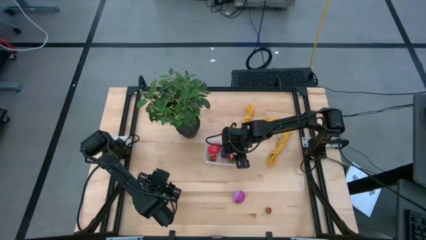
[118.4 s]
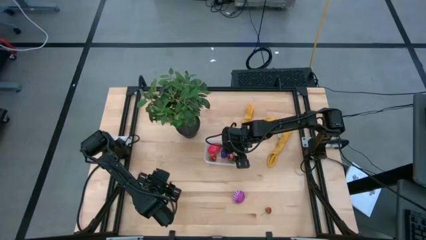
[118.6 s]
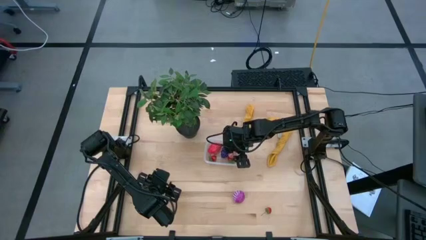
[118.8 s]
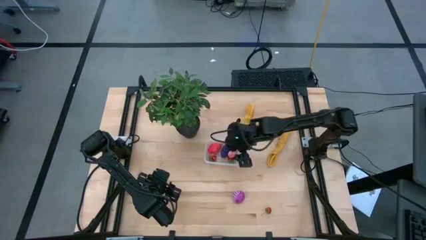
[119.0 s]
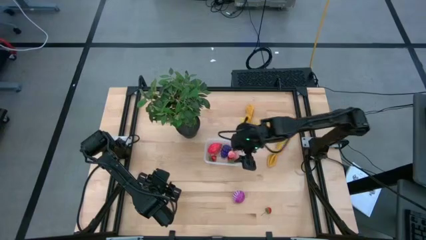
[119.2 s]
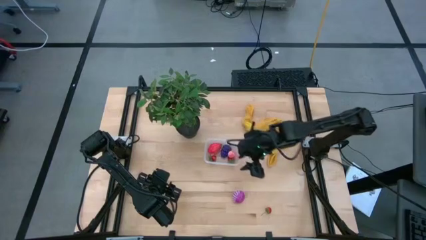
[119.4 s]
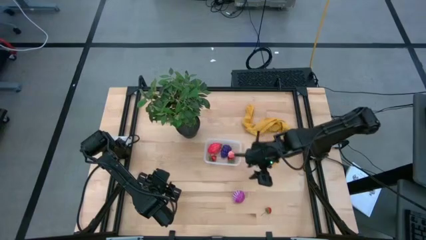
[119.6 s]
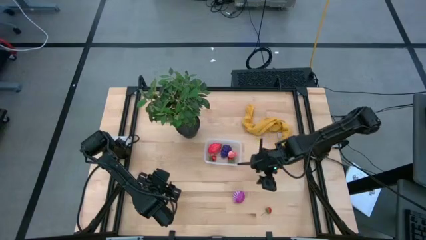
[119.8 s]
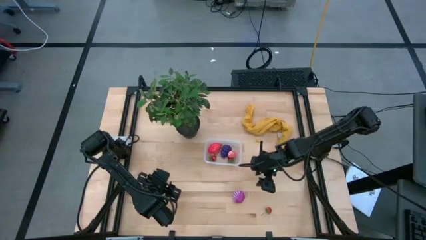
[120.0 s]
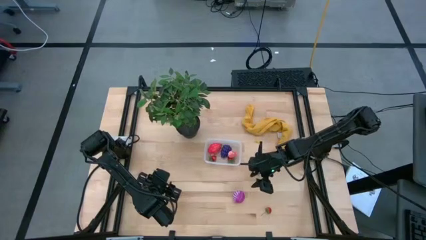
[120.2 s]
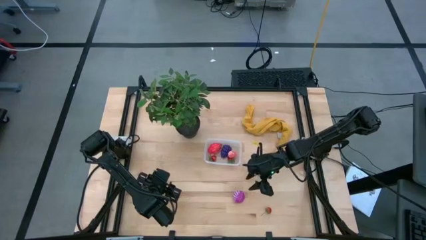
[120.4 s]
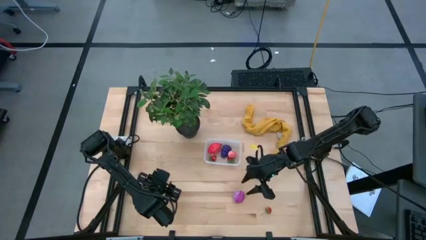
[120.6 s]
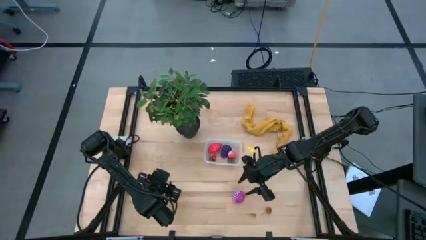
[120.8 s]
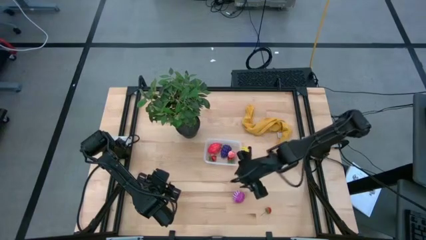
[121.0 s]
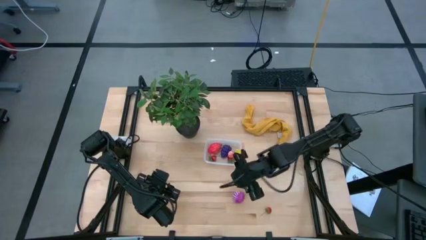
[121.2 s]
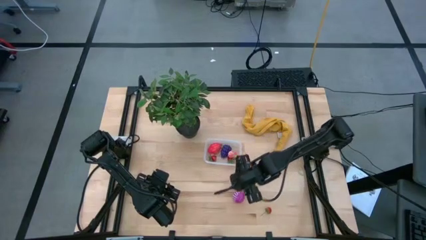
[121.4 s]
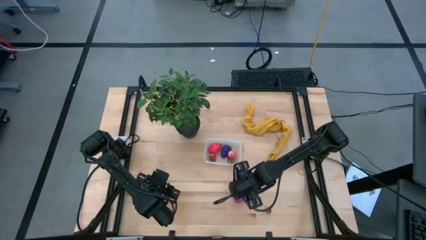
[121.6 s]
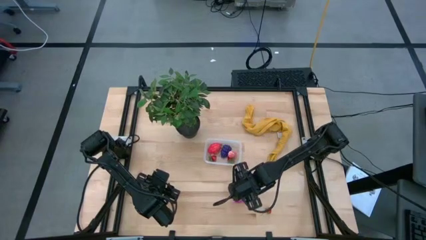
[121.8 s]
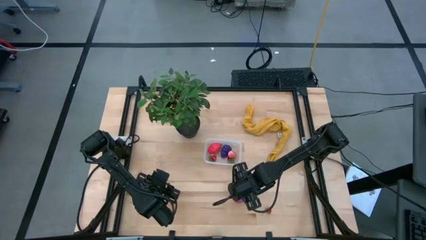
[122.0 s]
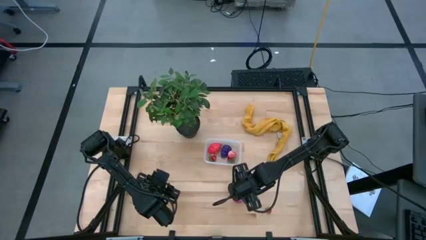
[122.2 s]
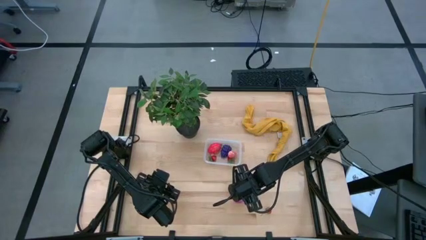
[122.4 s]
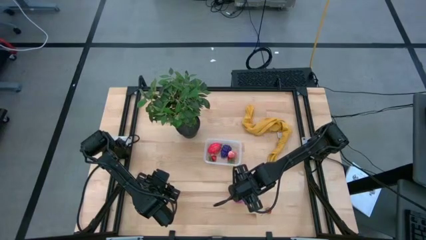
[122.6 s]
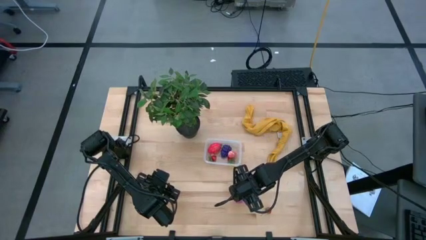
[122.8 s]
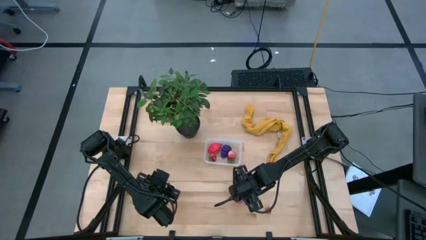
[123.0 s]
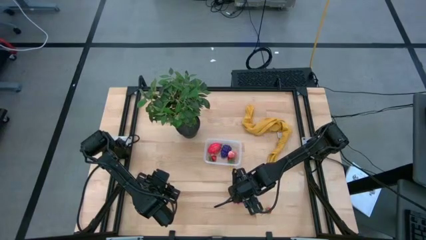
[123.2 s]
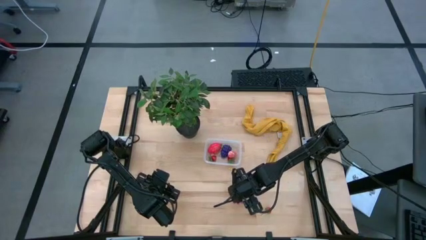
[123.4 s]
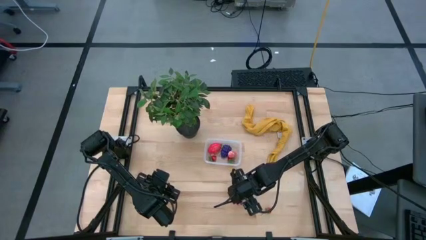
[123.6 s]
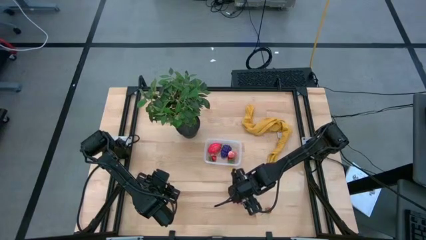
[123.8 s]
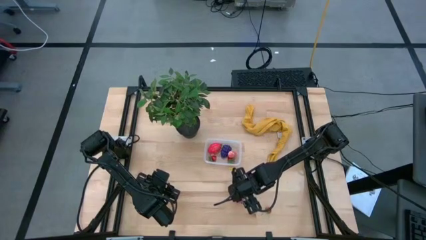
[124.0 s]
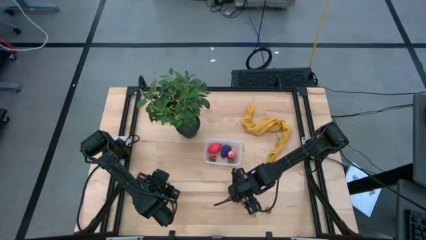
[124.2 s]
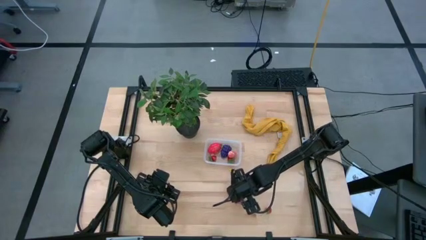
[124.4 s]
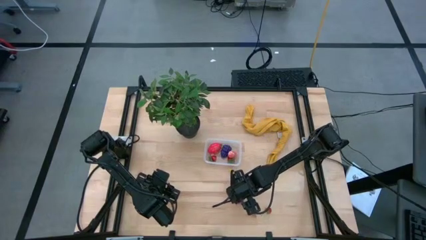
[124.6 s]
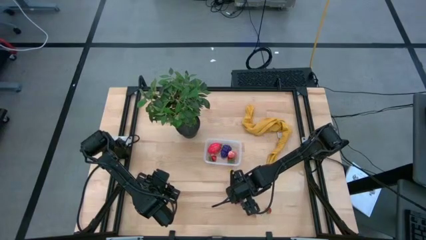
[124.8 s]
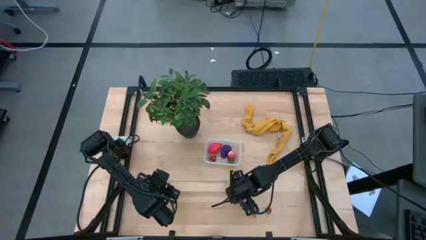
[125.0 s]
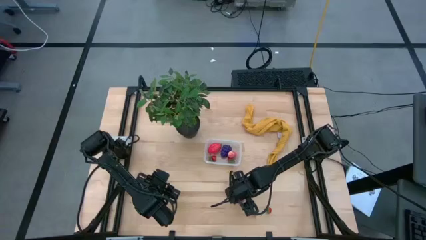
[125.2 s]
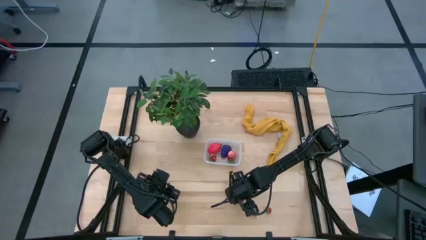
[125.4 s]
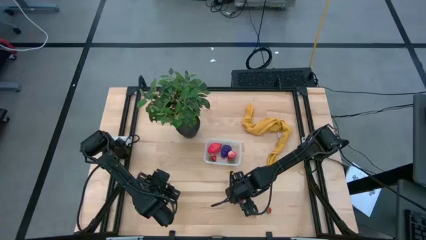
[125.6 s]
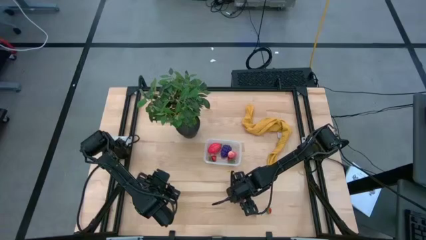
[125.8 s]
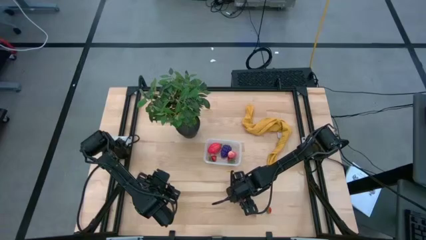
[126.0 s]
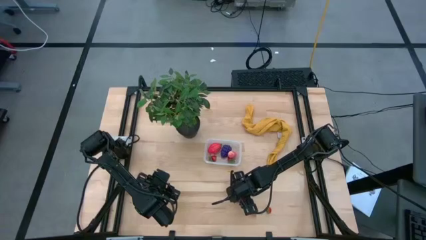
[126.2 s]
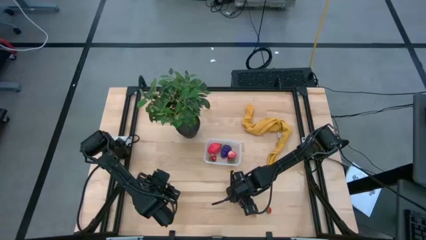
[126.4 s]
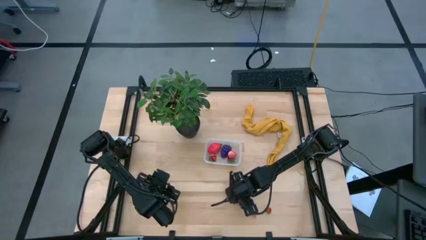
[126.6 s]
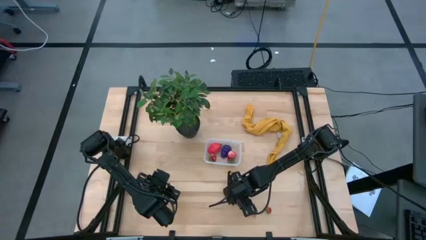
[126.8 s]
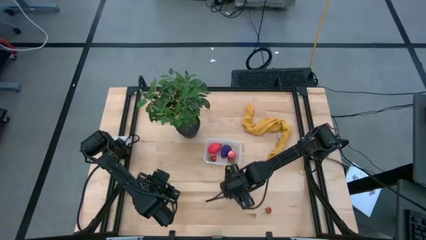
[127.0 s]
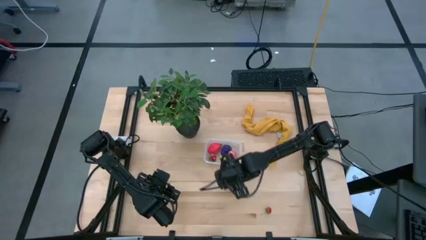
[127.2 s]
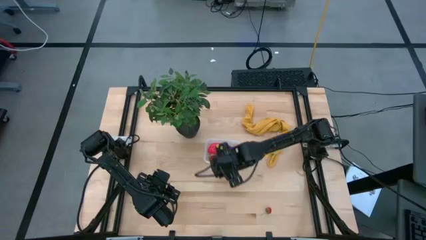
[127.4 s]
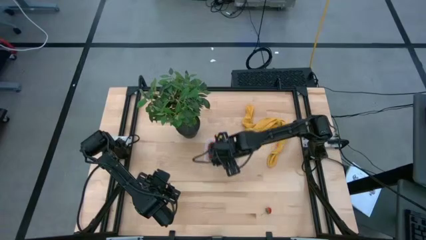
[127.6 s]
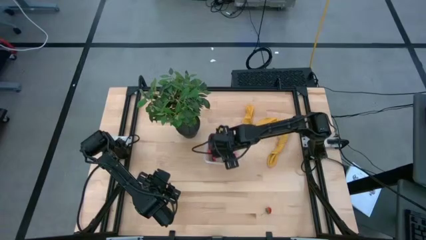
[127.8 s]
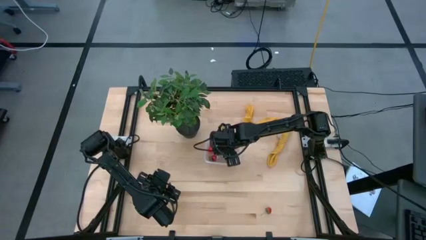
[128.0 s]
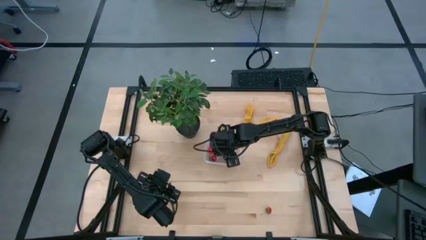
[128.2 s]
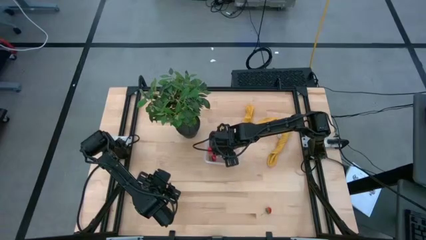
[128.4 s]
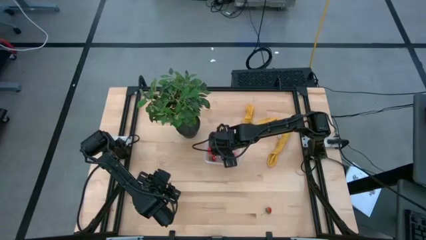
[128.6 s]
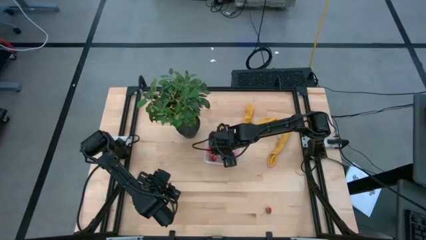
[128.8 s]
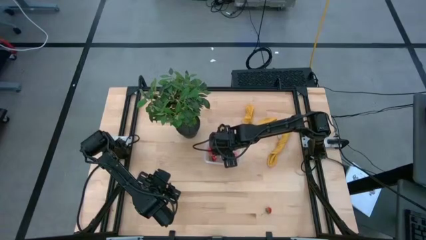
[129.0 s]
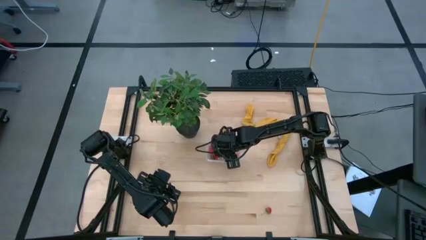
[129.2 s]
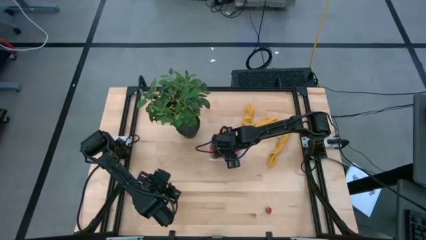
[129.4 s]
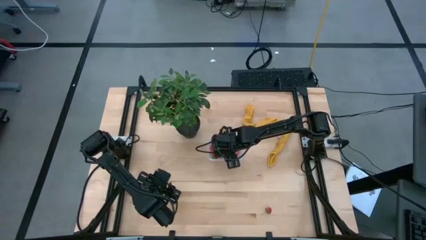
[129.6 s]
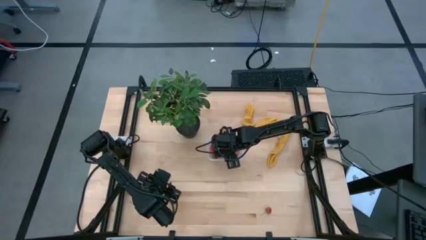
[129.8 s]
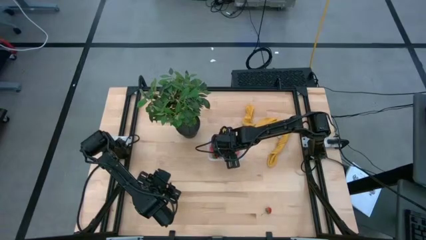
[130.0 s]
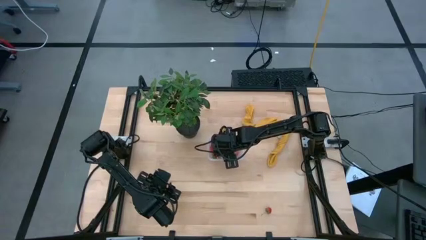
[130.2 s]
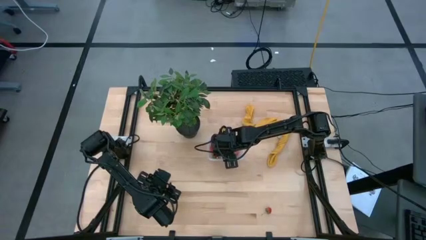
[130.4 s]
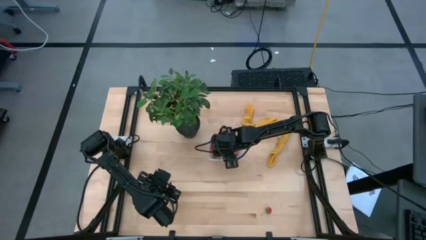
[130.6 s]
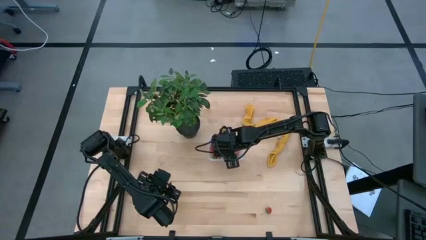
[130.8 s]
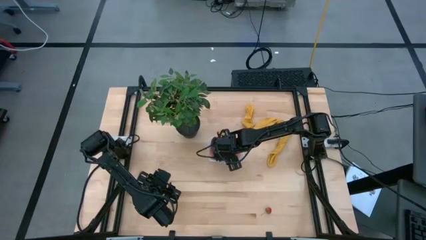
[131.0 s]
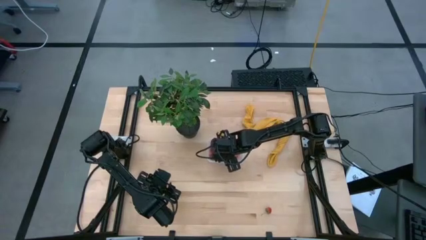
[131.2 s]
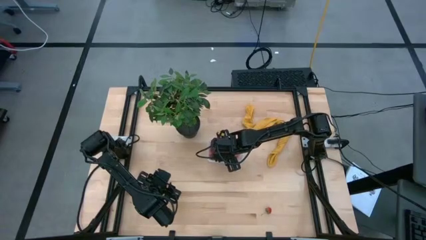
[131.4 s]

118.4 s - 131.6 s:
Task: Pick and placing Produce into tupperware
Put the onion into the bin

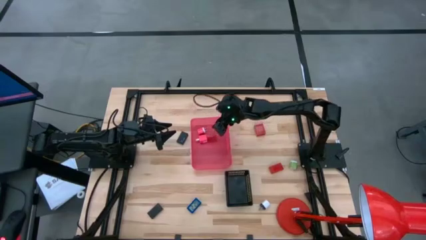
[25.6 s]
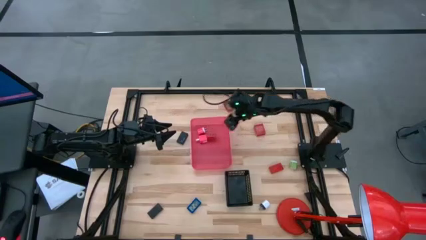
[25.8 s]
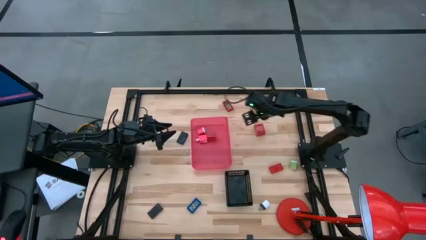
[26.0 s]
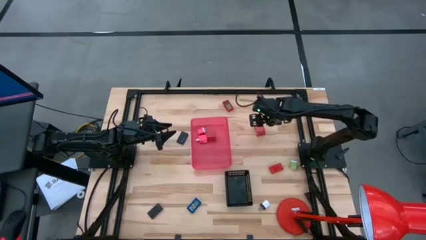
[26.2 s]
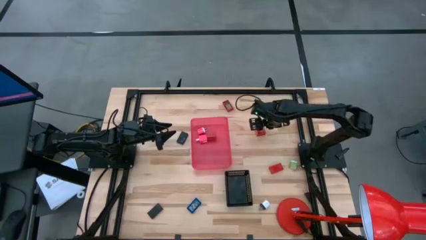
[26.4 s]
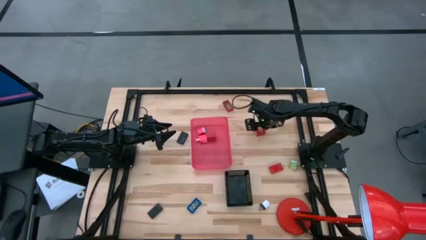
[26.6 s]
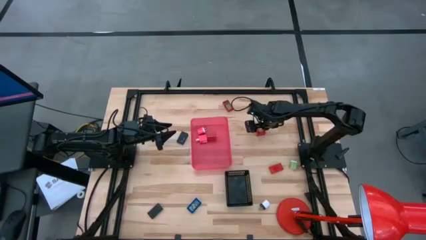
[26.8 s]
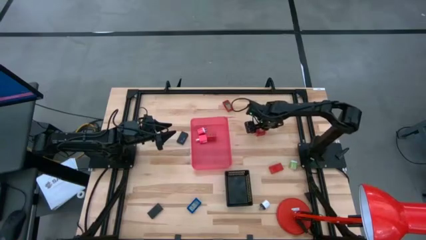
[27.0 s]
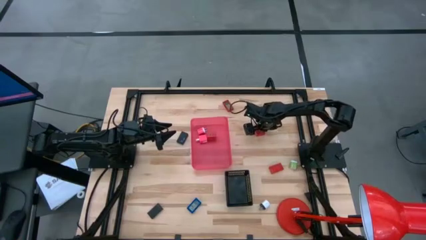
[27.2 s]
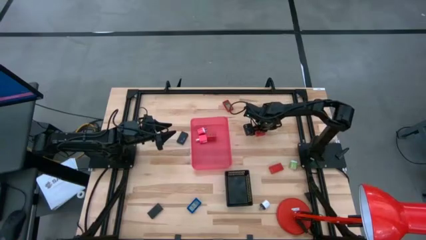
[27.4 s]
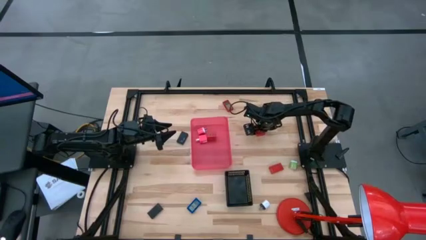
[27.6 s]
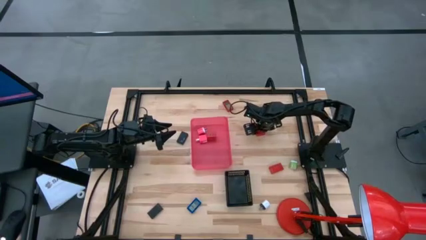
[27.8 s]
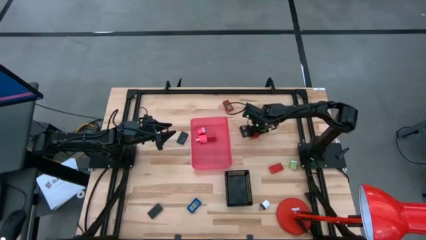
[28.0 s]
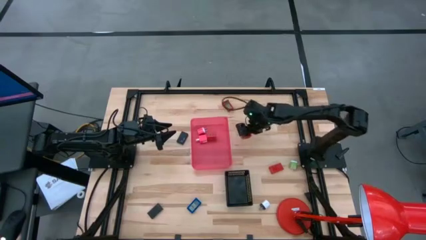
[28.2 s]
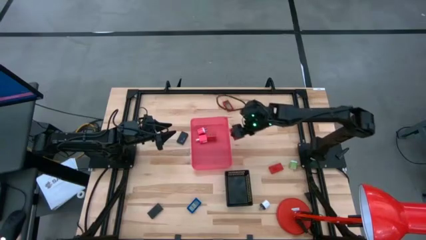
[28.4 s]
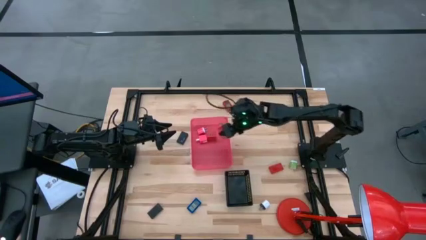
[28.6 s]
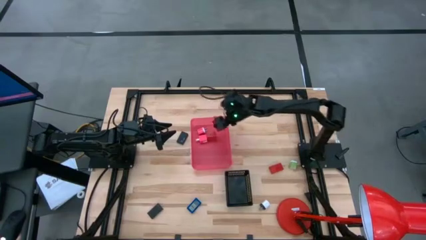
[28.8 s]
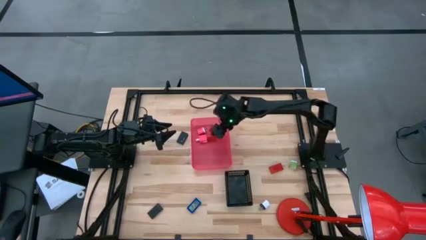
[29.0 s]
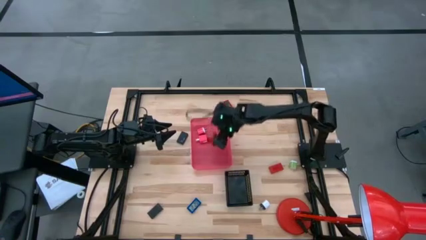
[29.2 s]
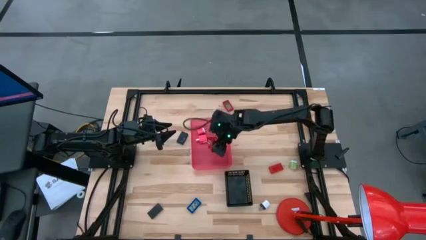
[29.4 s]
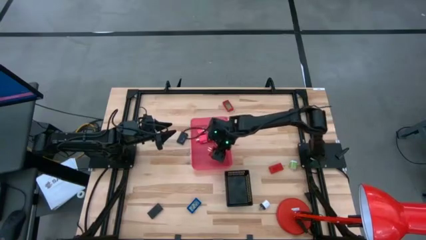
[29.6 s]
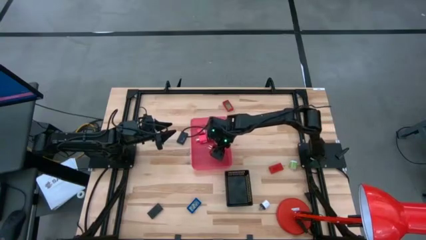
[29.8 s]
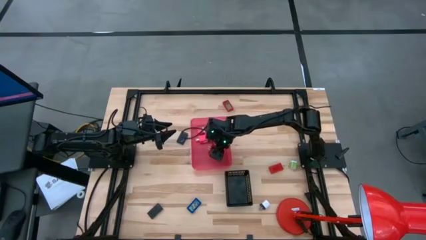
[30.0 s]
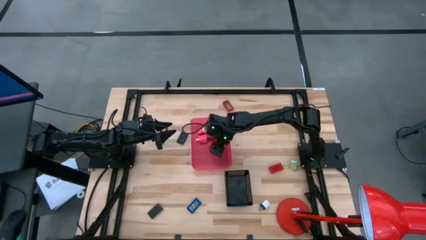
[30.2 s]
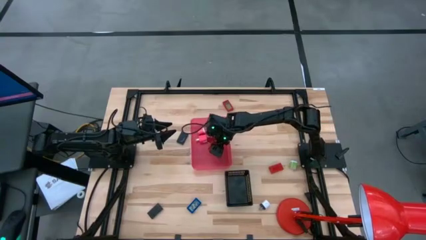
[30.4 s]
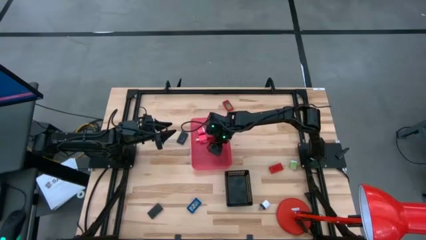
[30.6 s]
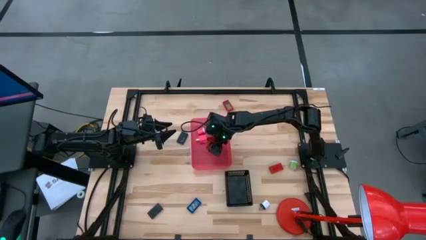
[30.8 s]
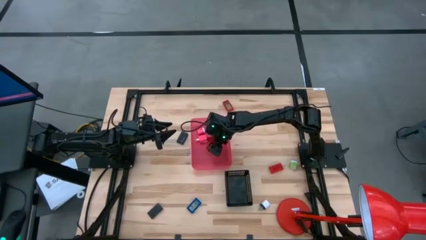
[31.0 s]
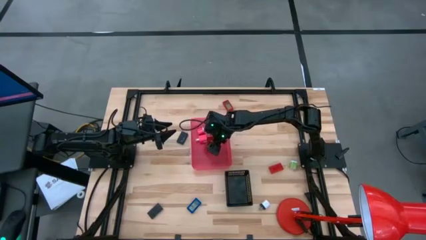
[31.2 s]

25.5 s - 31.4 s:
Task: Pick & Place Office items
Put the red charger adapter into the pink bin
